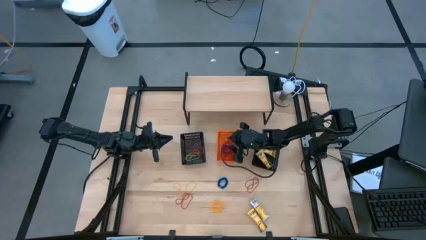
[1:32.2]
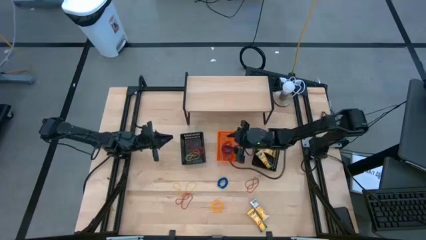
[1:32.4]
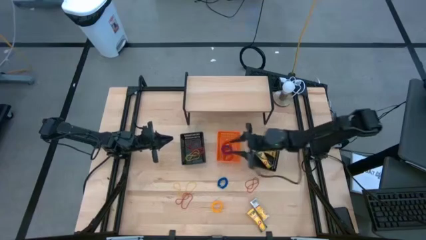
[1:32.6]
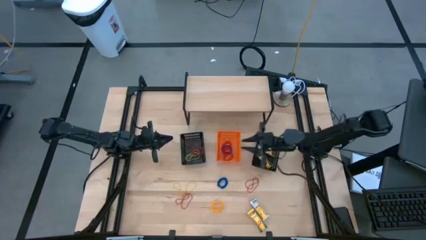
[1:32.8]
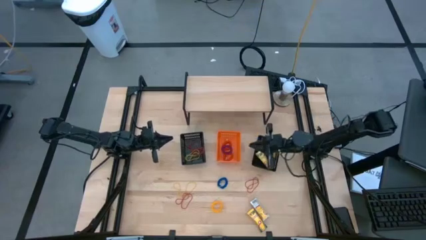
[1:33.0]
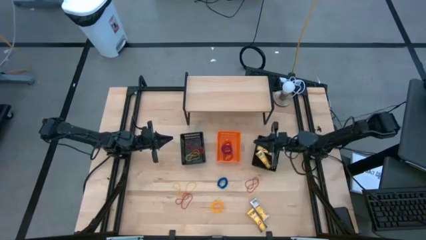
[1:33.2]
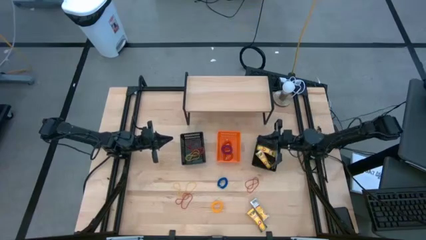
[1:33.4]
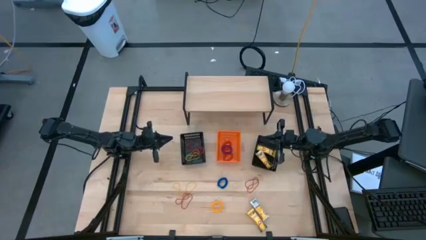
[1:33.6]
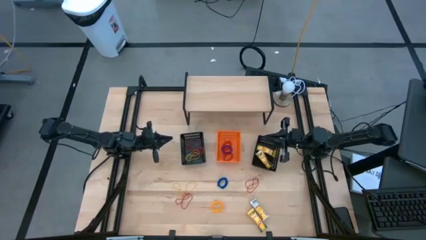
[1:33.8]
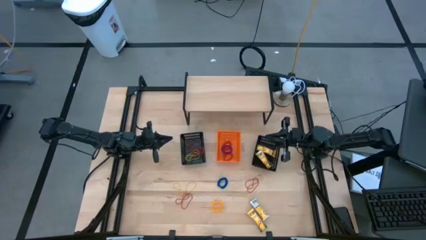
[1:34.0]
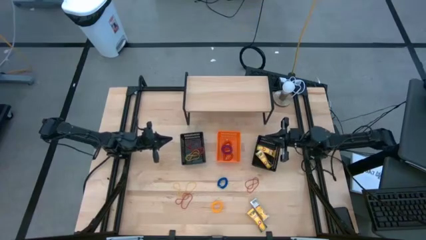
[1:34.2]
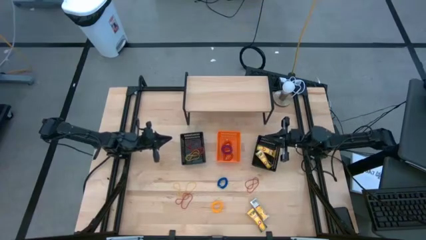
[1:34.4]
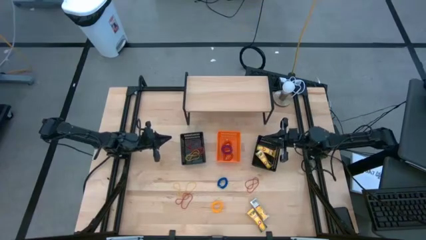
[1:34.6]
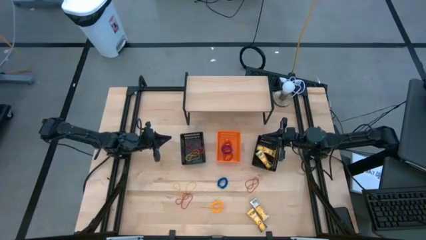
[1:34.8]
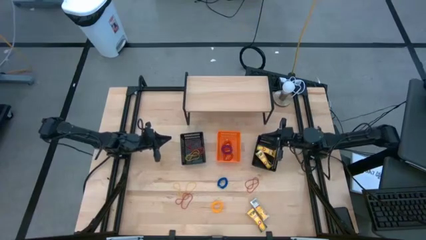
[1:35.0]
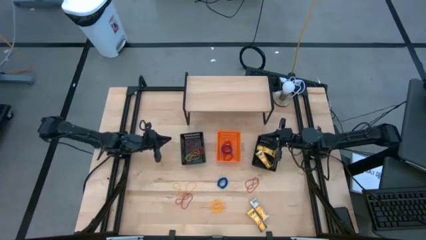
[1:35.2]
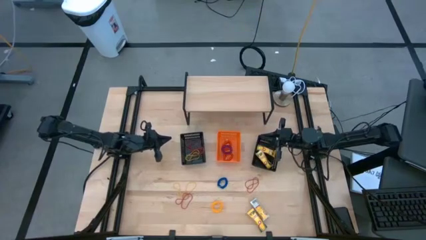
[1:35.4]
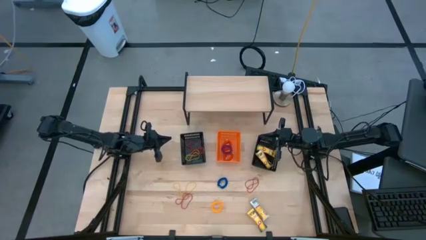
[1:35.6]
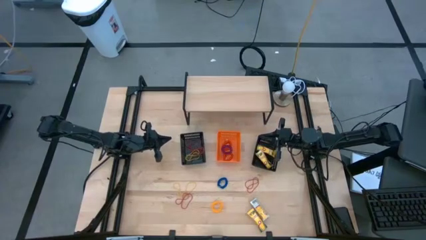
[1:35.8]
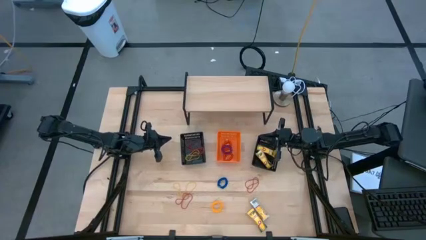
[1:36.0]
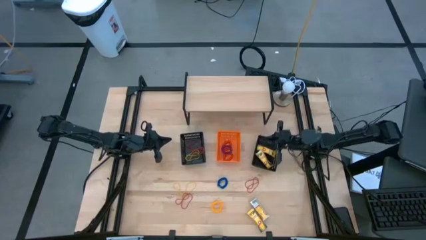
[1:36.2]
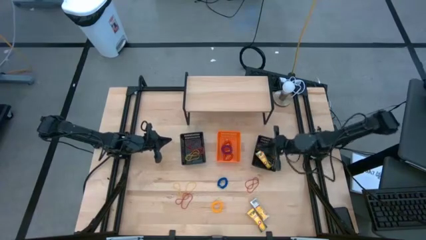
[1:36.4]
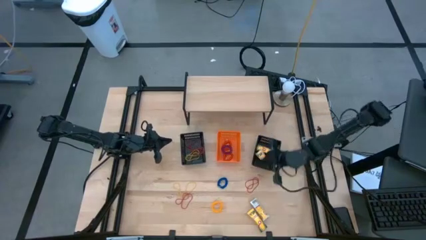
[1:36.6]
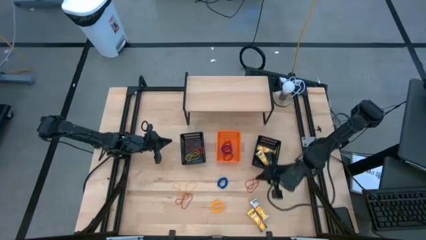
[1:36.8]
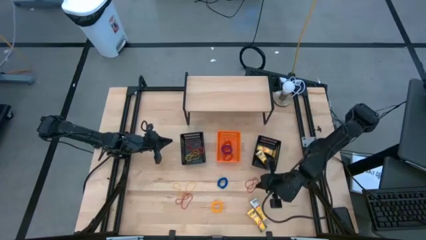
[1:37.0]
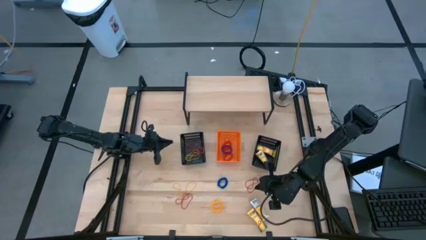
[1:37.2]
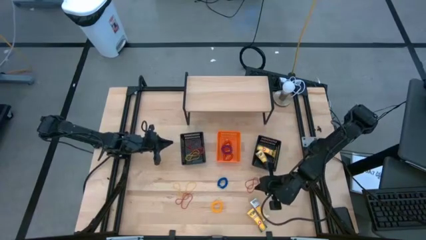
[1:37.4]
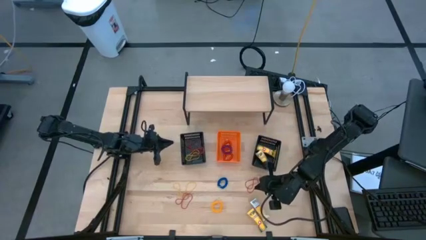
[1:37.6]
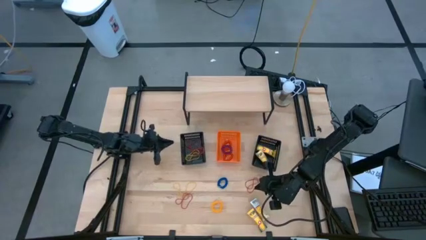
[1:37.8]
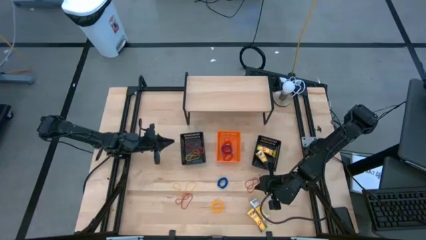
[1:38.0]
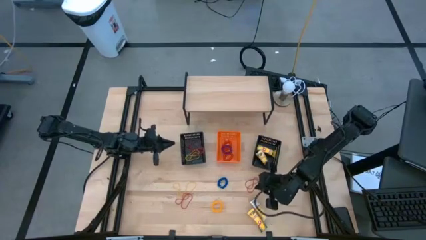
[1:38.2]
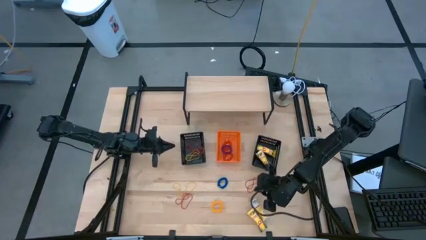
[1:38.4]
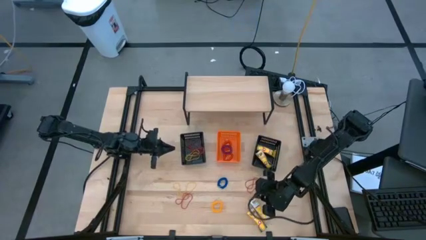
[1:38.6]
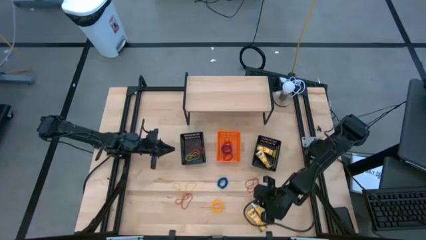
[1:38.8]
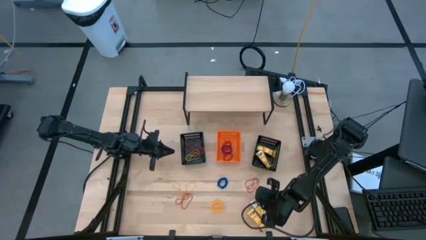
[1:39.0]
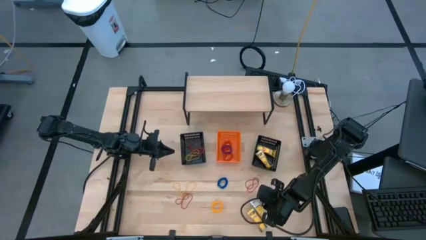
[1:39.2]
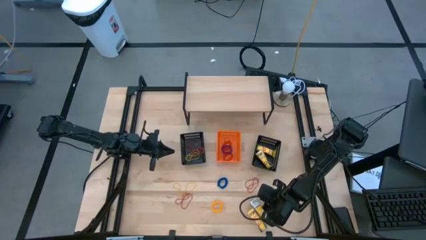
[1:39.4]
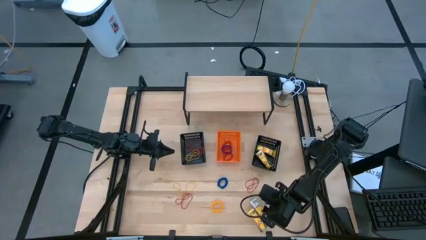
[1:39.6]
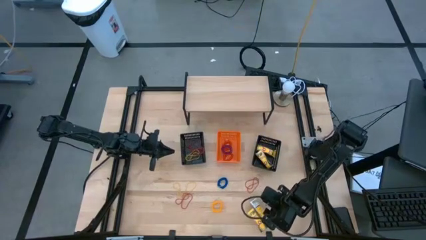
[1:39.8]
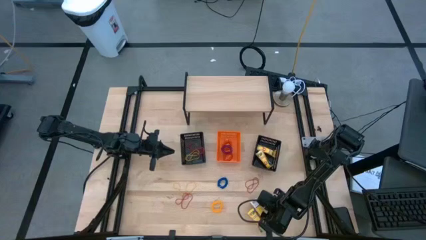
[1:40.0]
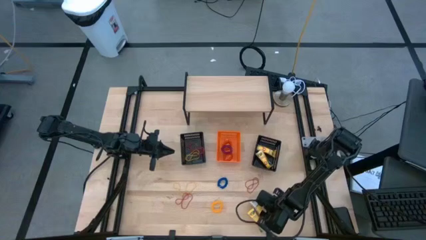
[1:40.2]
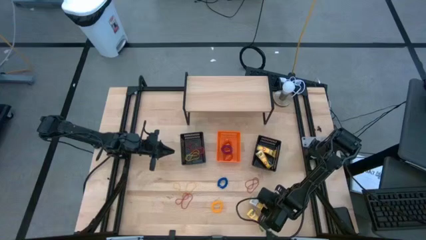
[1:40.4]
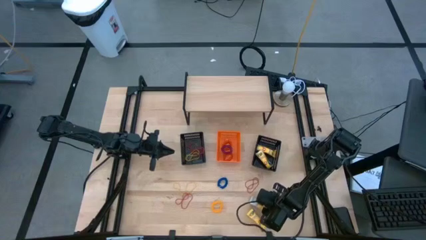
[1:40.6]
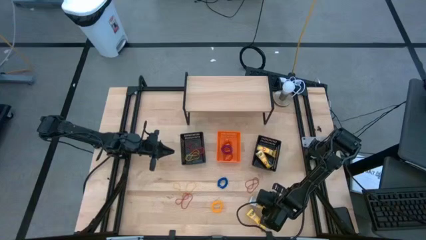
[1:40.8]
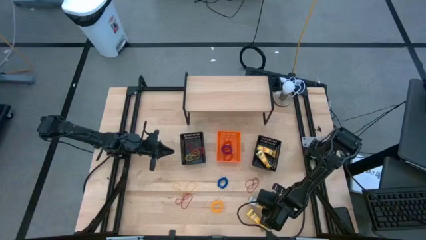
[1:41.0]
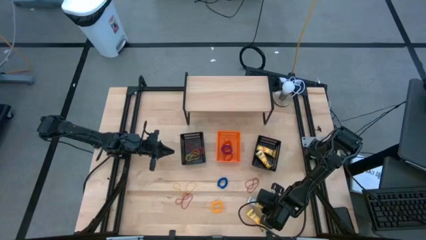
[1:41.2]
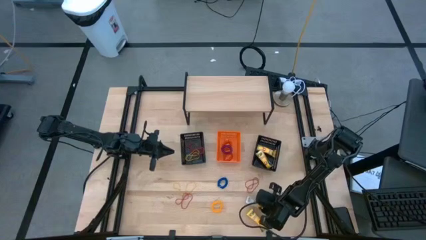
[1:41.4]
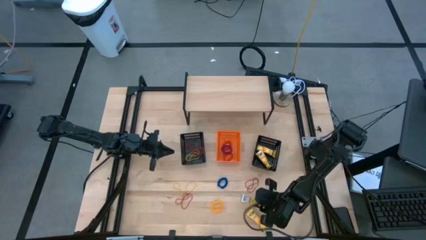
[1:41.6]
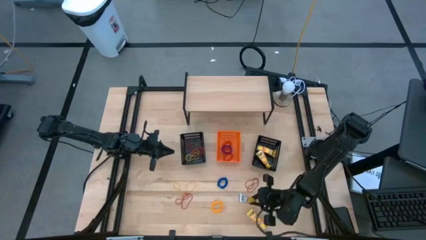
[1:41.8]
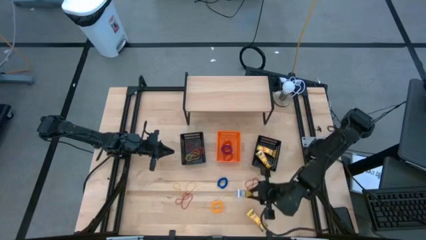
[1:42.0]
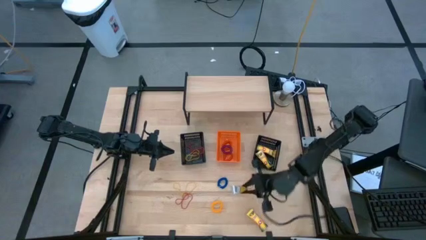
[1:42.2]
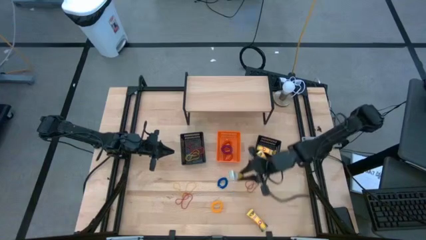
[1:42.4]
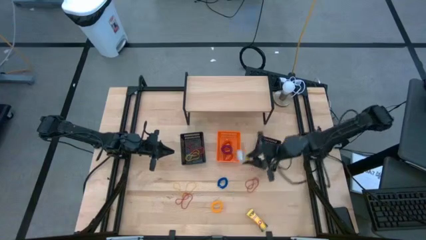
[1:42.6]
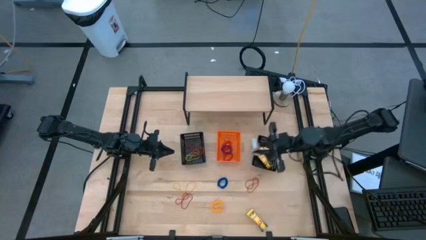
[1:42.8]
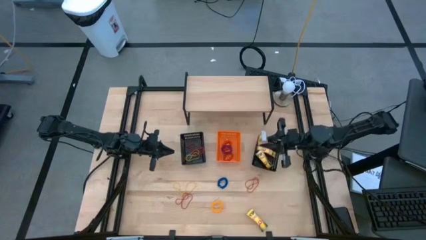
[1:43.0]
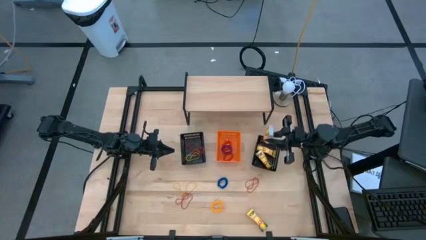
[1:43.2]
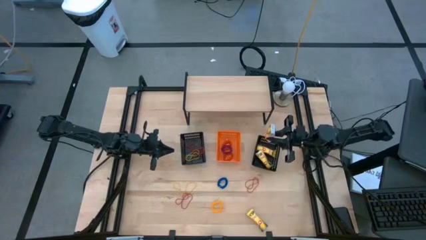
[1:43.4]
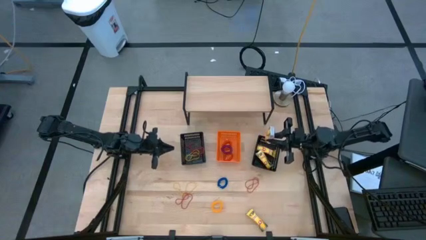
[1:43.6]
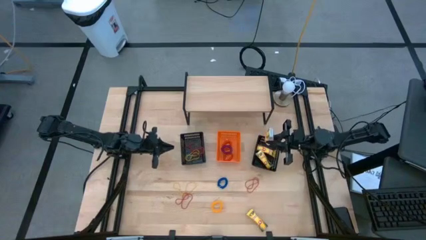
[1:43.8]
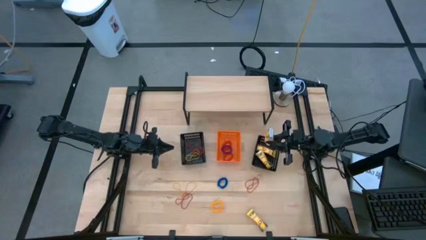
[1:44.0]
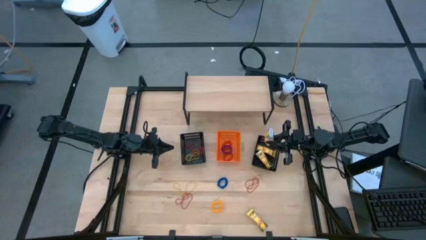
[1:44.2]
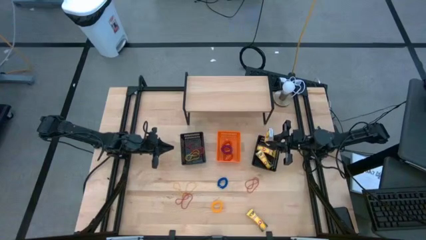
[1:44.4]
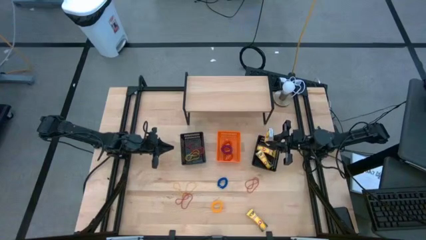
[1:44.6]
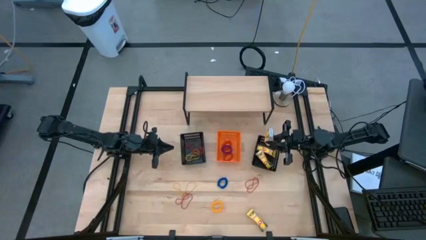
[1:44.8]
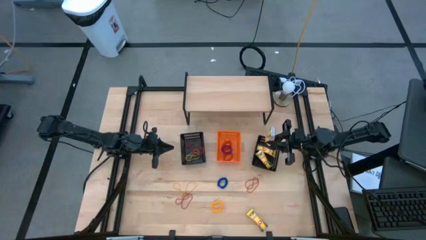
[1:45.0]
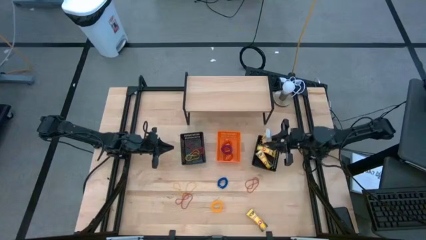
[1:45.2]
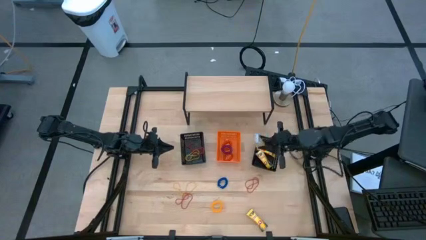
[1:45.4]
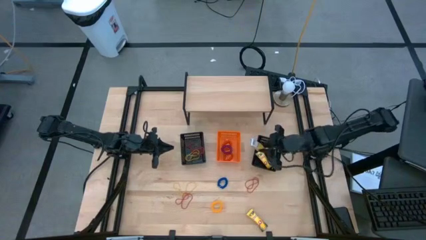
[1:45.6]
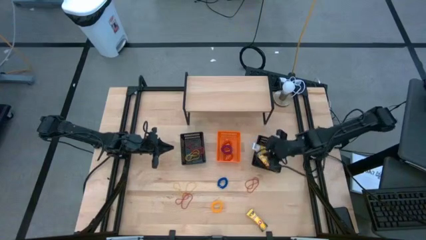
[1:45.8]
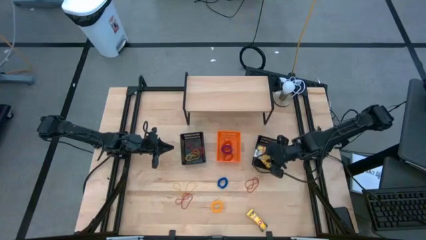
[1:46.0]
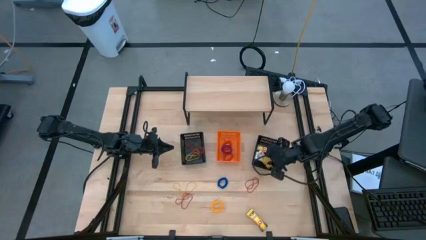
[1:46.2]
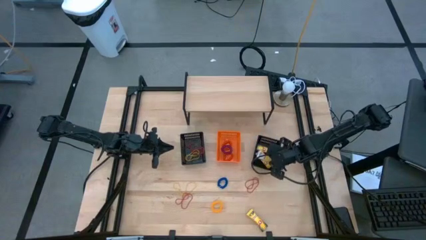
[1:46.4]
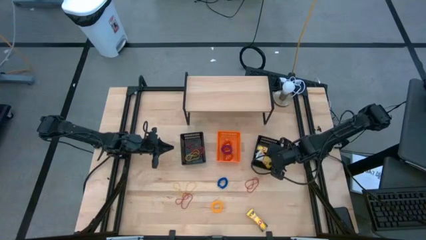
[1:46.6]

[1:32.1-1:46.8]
Task: Pick & Place Office Desk Supplies
Put the crayon box into the right black bin
